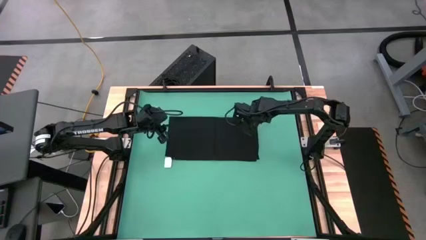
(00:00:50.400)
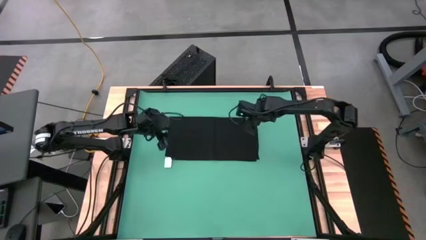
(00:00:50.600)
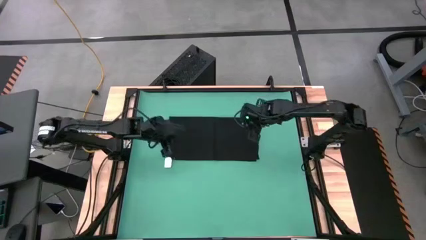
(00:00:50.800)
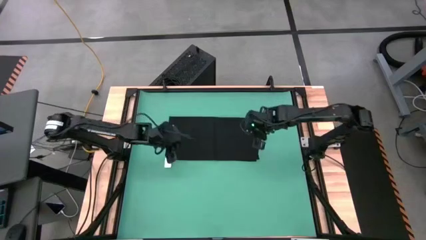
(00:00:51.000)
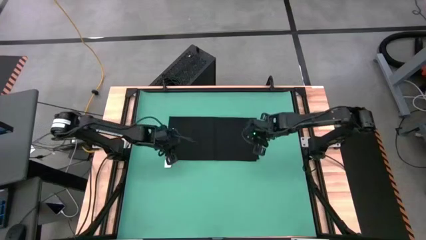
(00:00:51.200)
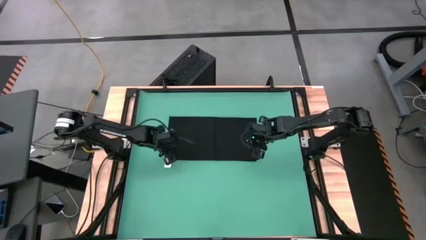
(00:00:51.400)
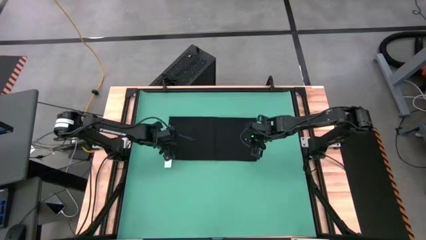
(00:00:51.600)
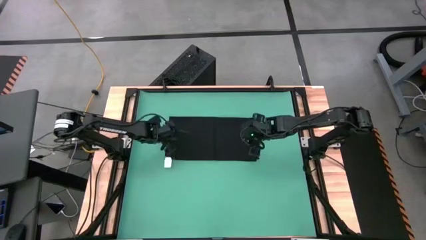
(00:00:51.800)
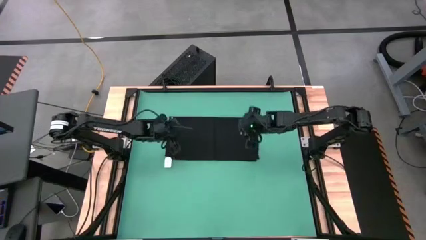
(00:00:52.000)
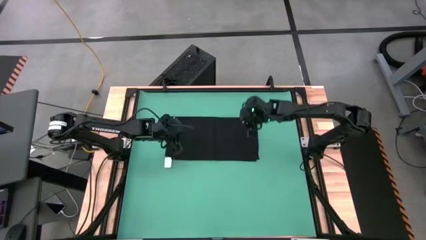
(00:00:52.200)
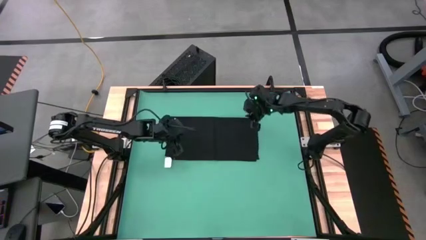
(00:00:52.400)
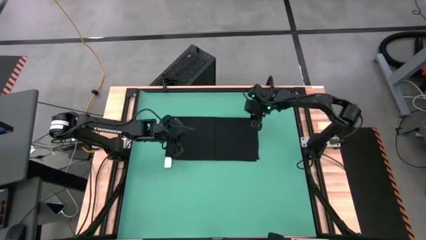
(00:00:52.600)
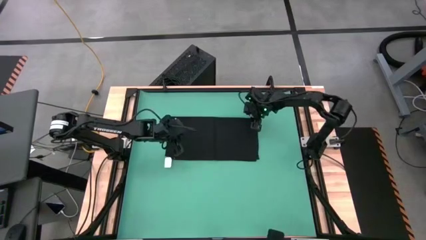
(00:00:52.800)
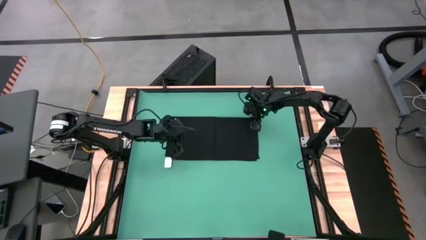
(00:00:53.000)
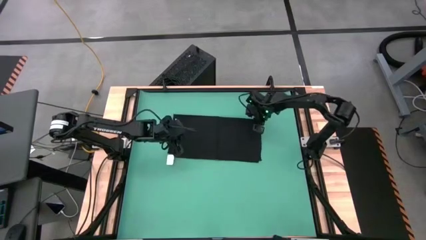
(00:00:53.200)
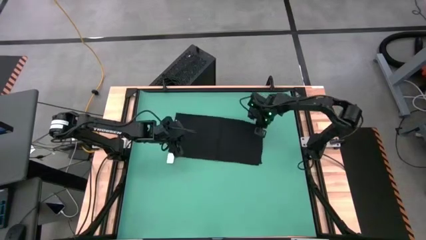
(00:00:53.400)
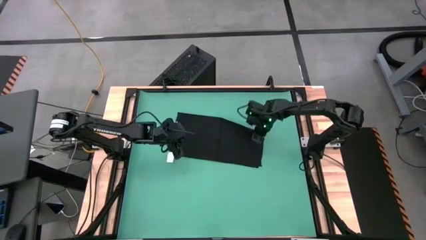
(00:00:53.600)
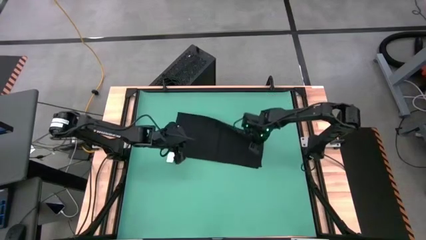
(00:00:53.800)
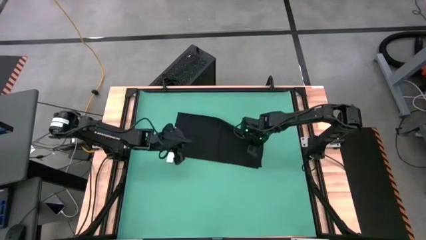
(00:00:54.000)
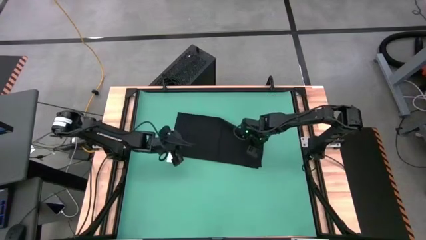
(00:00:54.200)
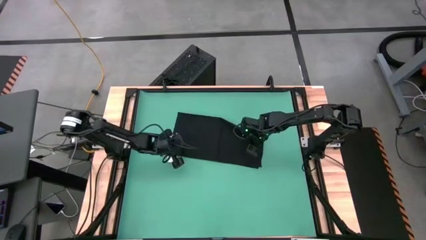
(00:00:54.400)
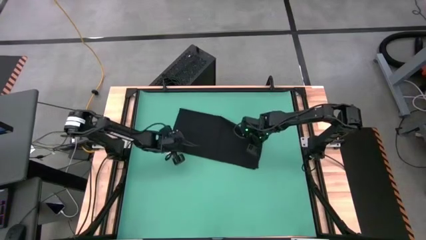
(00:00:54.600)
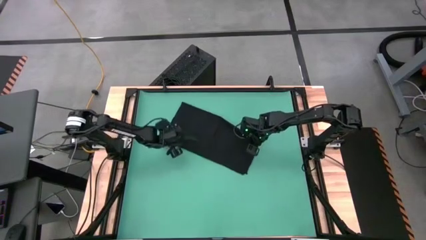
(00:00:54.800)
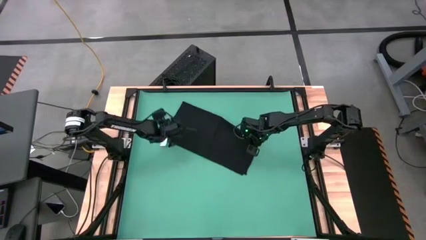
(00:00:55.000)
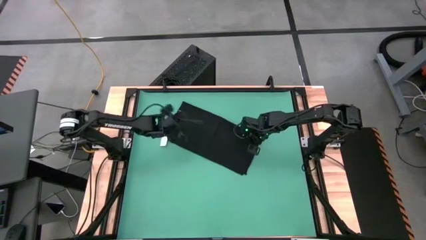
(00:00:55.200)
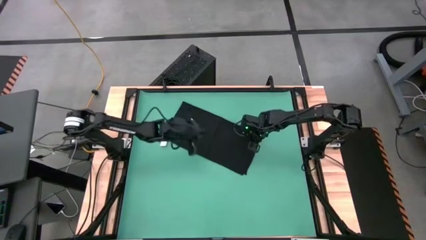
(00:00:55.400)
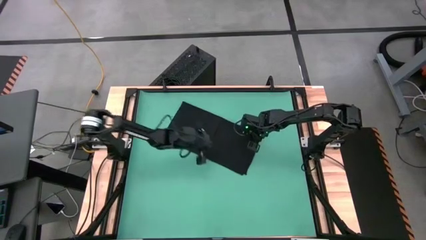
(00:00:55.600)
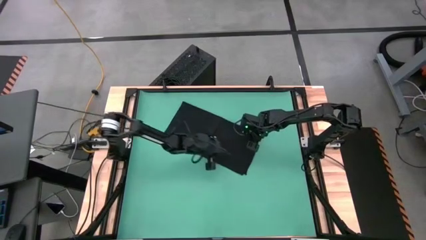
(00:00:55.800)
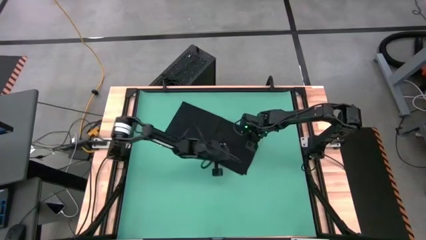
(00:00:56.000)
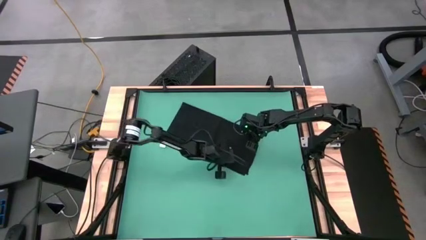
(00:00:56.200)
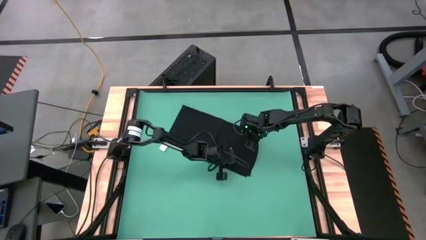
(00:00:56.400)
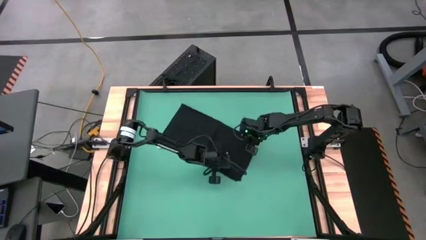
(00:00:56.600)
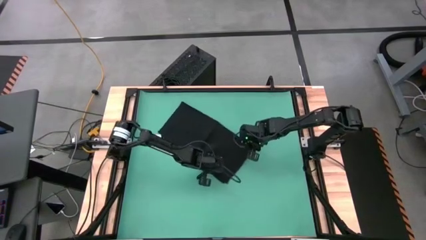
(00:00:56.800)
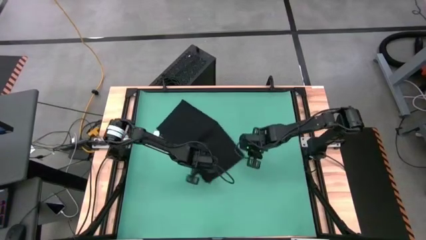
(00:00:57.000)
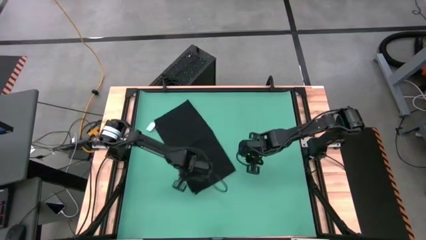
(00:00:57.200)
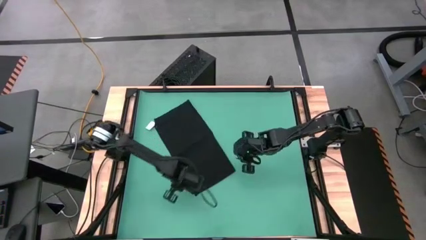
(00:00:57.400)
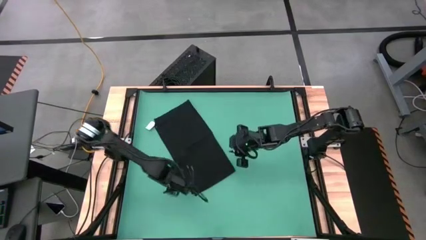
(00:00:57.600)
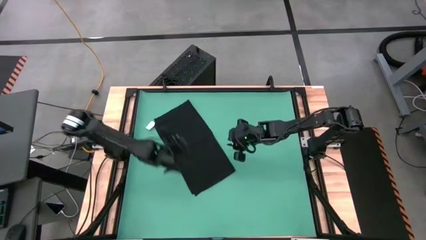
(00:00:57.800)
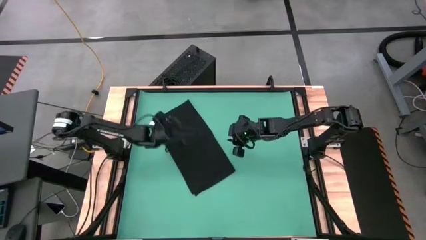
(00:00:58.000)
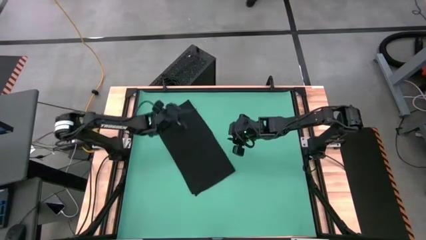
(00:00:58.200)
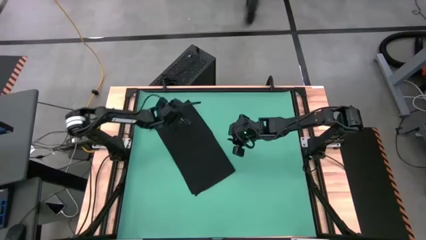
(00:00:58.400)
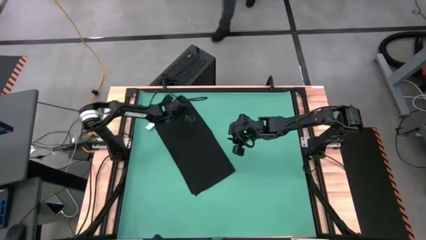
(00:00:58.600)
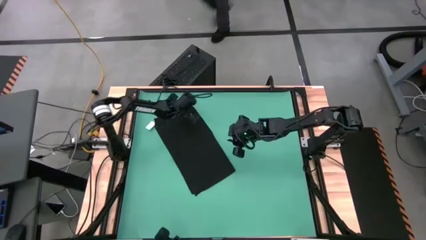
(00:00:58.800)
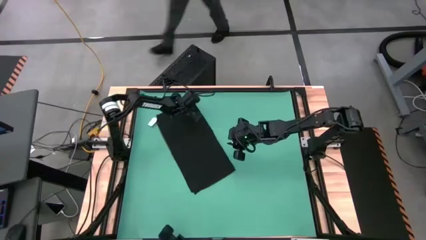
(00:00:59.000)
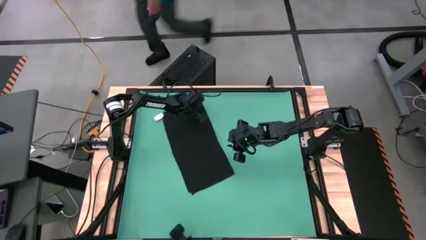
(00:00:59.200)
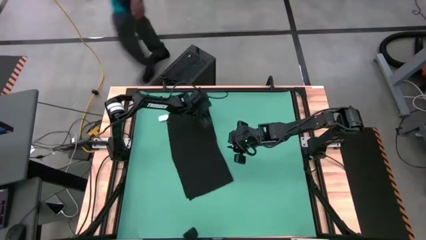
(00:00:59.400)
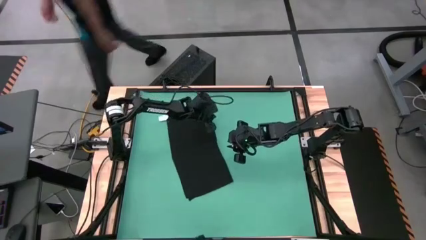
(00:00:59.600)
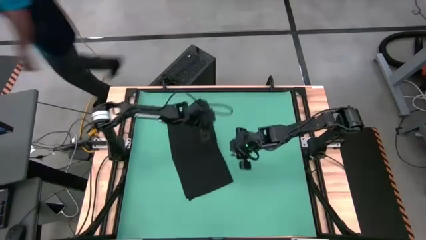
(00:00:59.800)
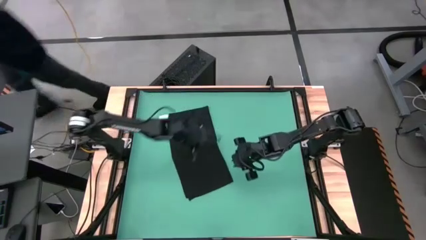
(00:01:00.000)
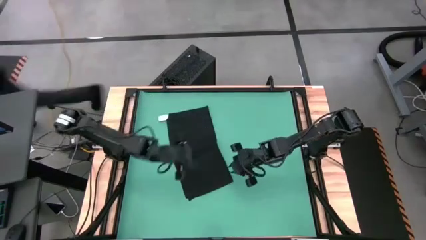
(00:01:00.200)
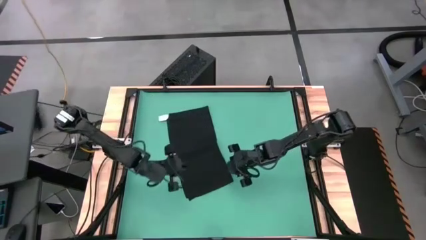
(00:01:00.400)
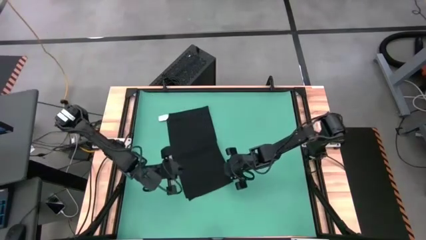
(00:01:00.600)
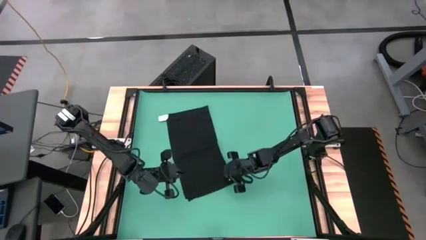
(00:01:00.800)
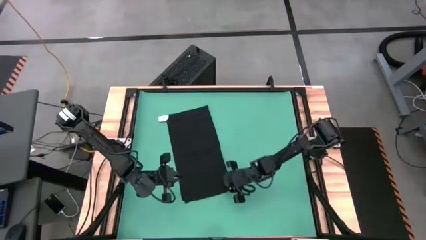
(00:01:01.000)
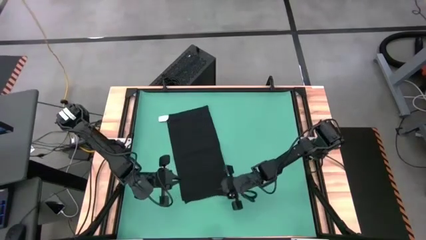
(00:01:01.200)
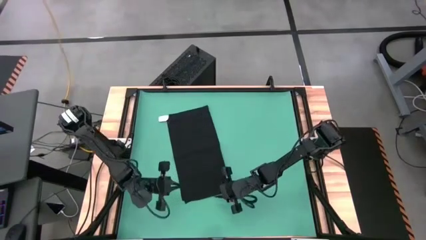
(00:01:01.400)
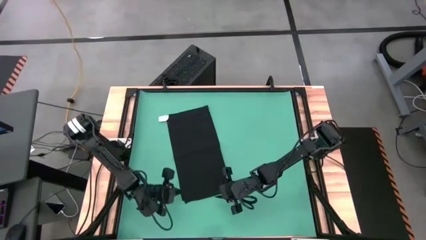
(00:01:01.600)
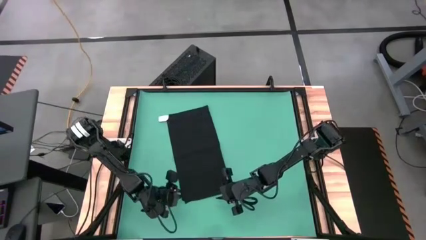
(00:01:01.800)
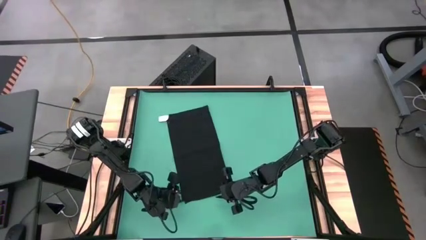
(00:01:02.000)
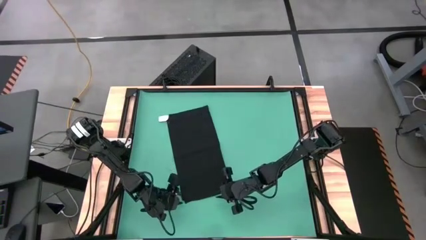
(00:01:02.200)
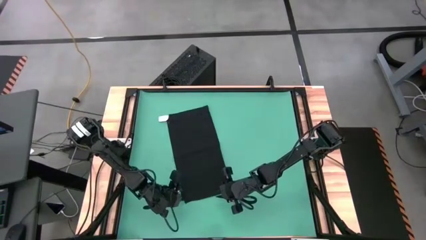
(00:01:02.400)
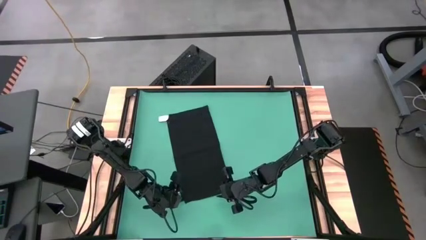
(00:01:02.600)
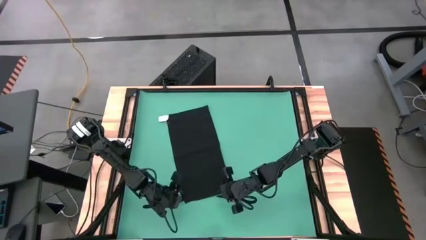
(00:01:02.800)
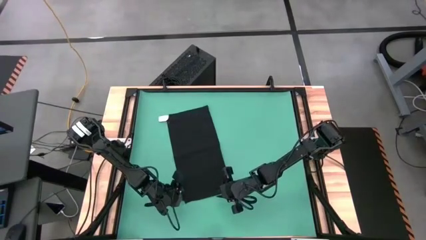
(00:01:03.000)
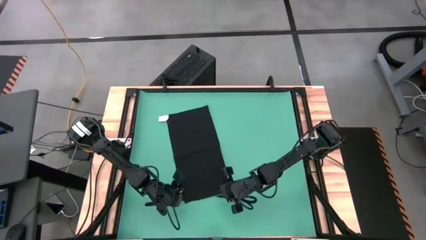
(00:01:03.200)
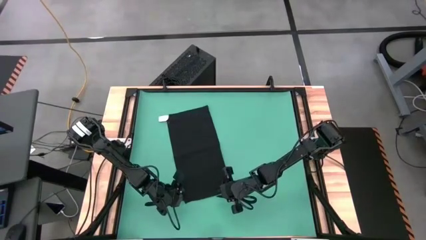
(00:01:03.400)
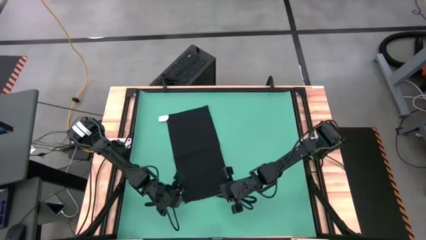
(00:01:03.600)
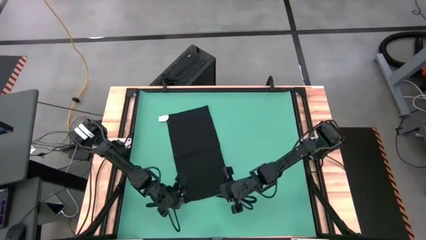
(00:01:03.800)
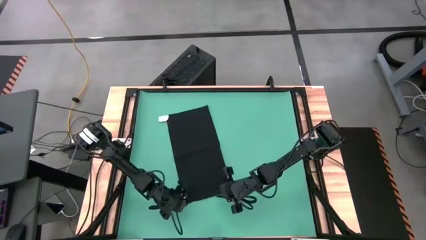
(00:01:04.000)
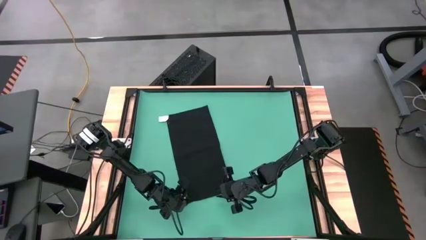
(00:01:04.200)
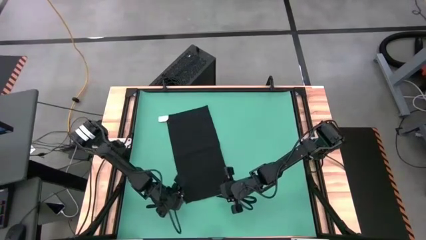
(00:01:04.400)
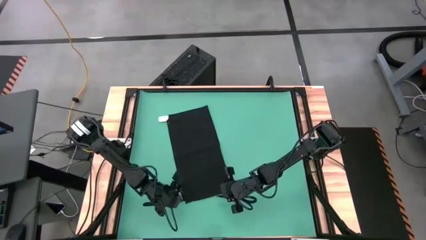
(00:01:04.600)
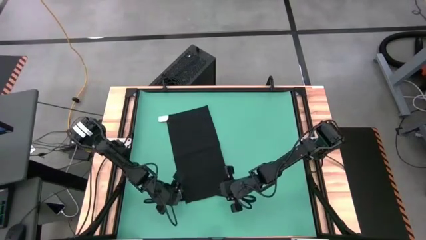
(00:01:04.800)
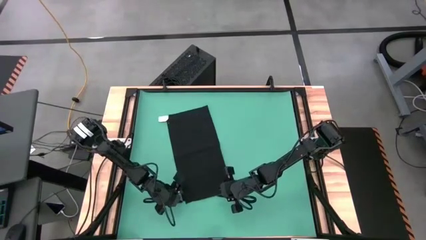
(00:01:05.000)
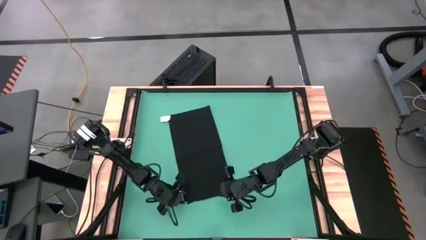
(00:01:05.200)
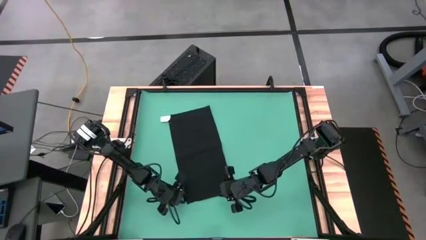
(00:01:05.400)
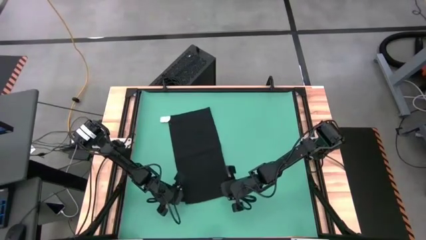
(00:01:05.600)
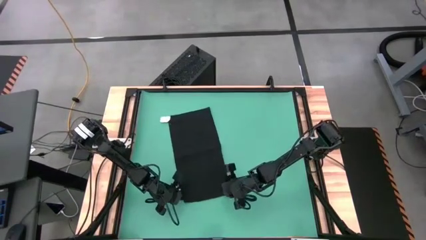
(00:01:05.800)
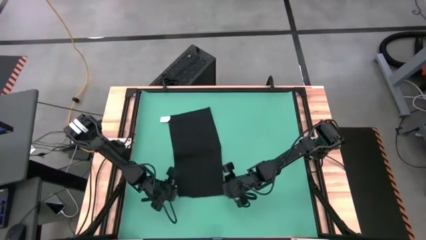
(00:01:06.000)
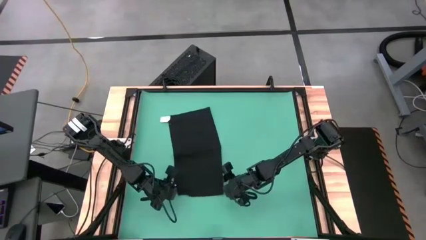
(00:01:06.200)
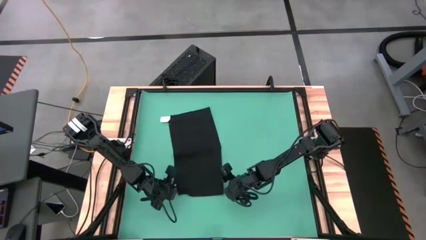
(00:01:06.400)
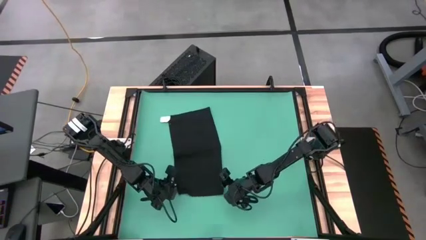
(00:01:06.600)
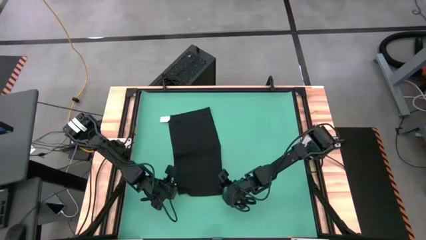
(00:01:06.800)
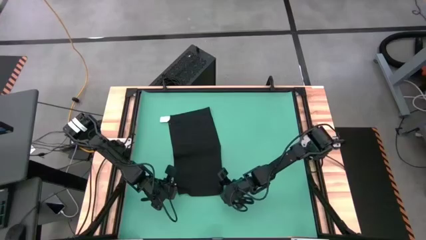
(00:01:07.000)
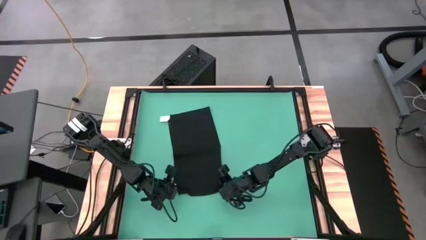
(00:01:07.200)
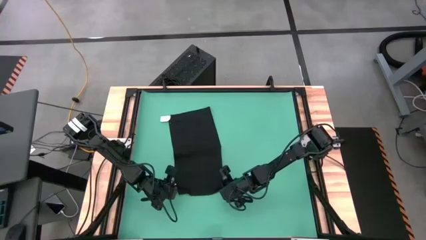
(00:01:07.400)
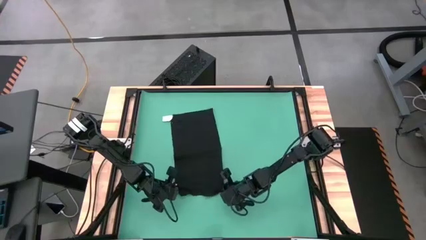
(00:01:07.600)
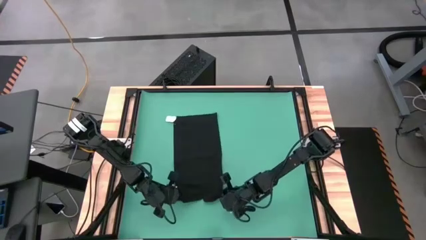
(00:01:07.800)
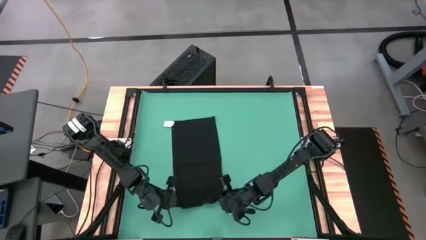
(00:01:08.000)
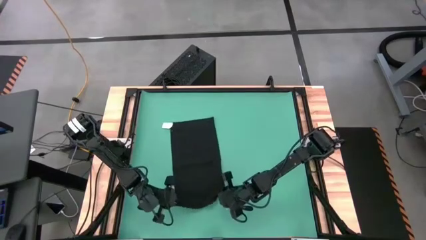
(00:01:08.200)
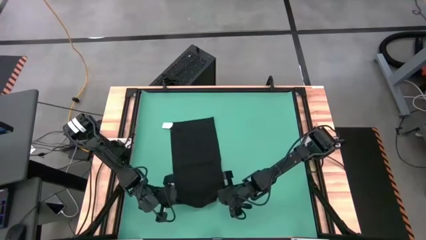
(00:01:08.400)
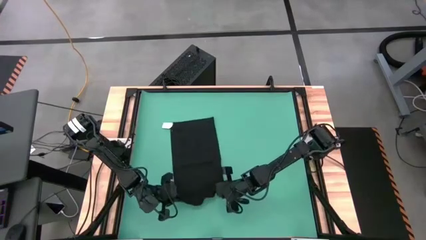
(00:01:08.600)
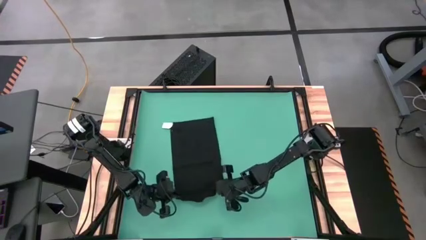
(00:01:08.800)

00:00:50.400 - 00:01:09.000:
Task: Roll towel into tight, uniform cylinder
Roll the towel
